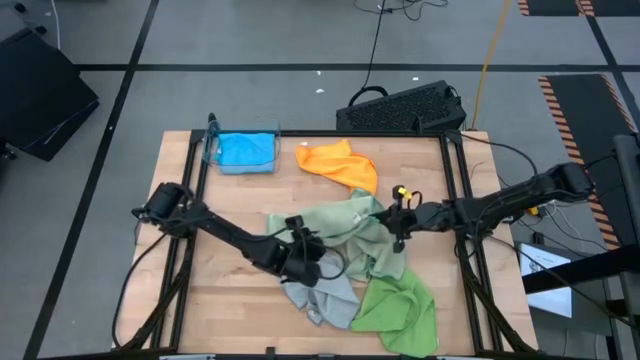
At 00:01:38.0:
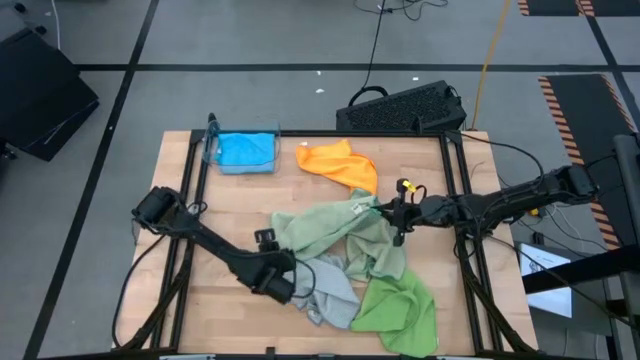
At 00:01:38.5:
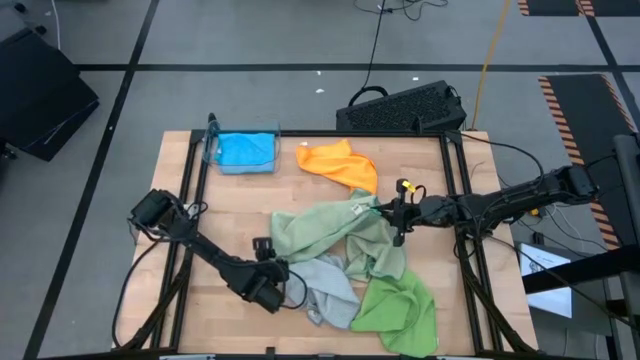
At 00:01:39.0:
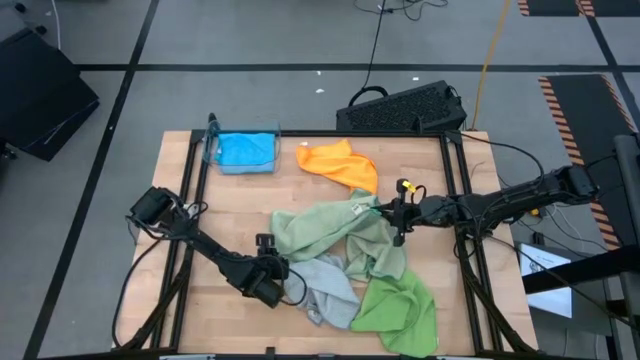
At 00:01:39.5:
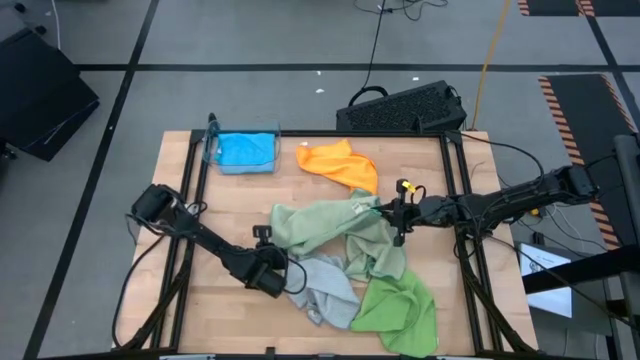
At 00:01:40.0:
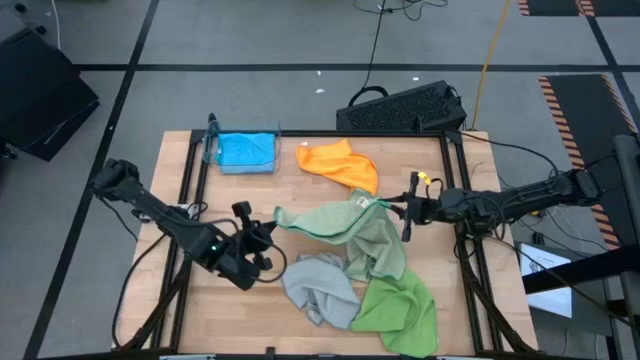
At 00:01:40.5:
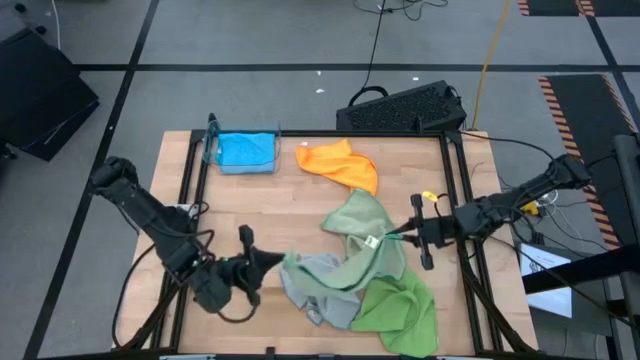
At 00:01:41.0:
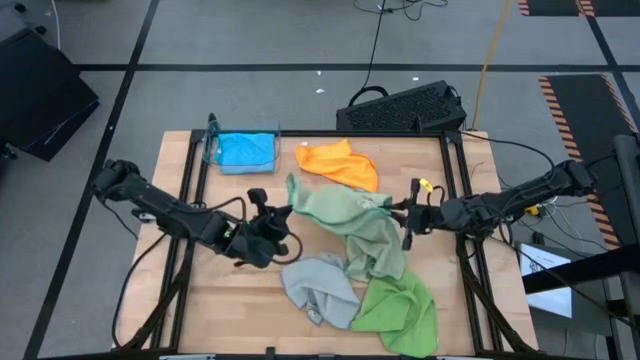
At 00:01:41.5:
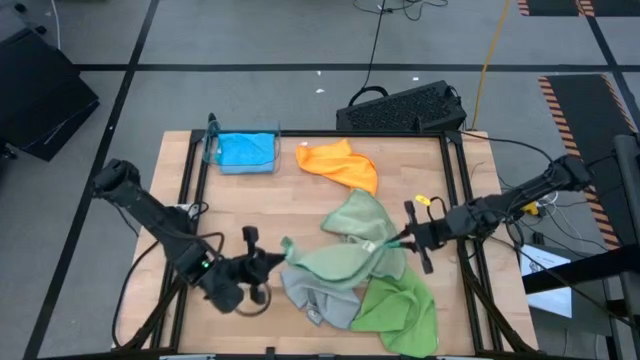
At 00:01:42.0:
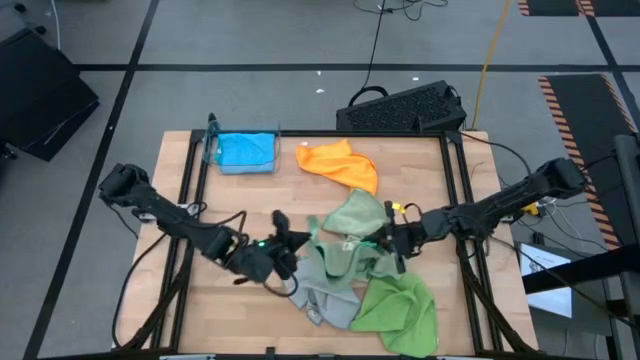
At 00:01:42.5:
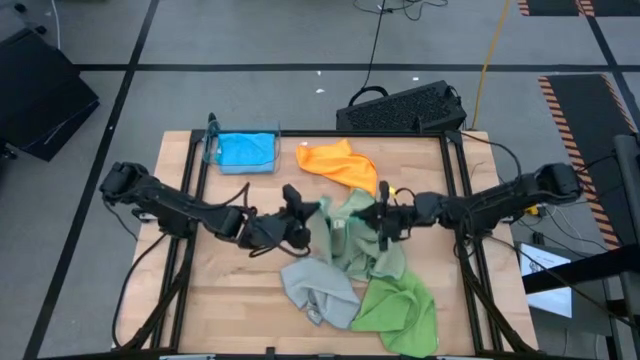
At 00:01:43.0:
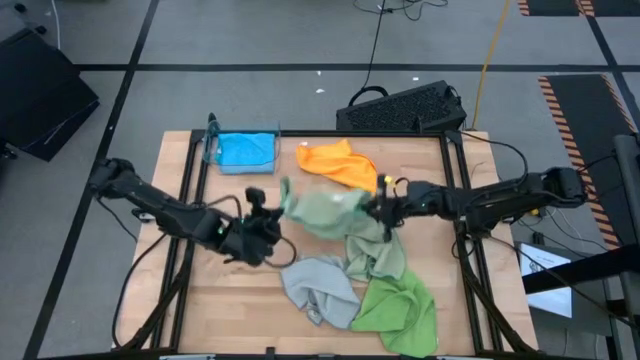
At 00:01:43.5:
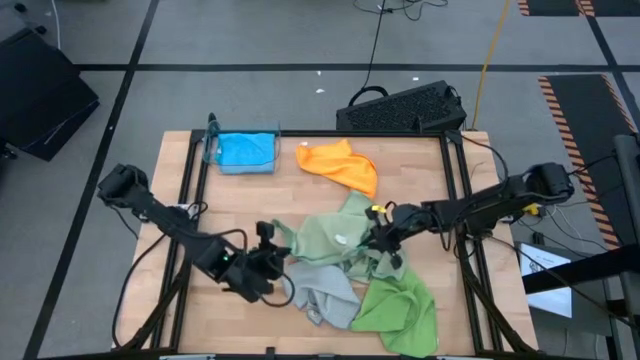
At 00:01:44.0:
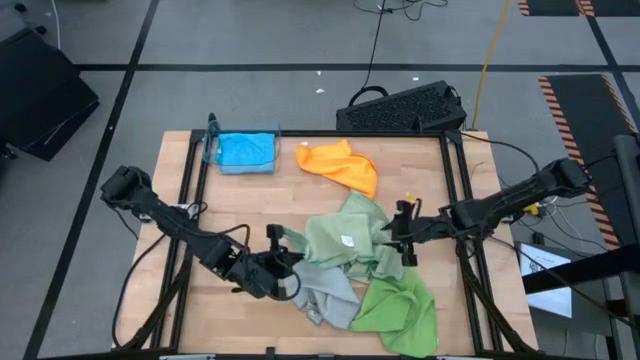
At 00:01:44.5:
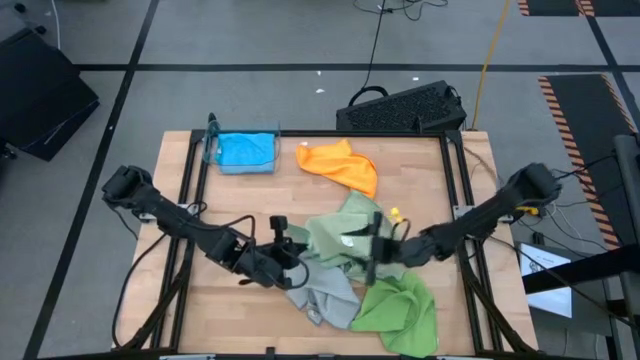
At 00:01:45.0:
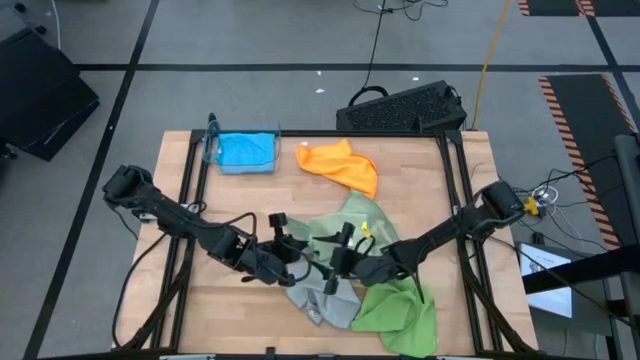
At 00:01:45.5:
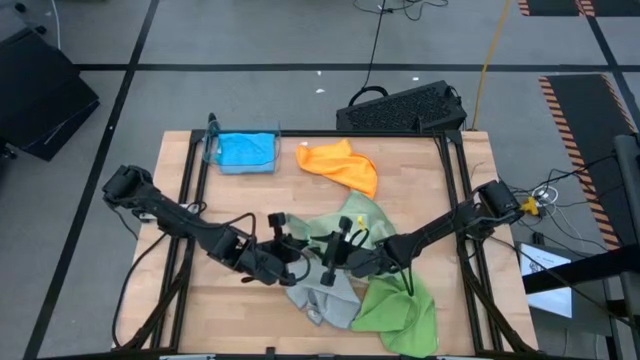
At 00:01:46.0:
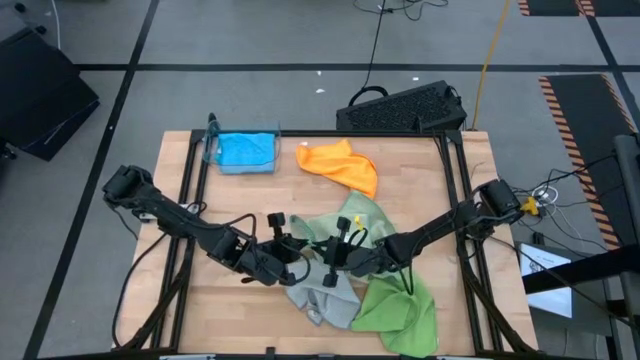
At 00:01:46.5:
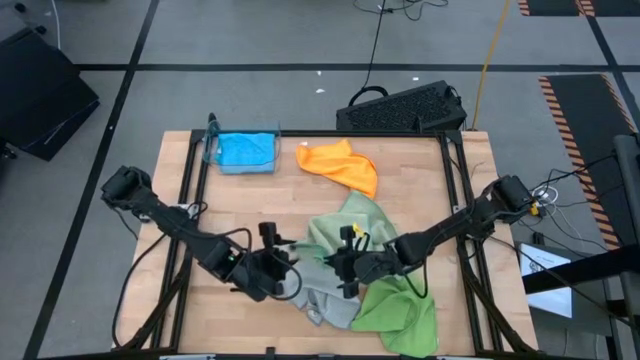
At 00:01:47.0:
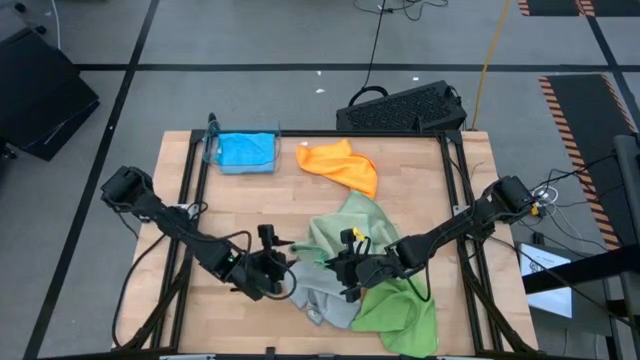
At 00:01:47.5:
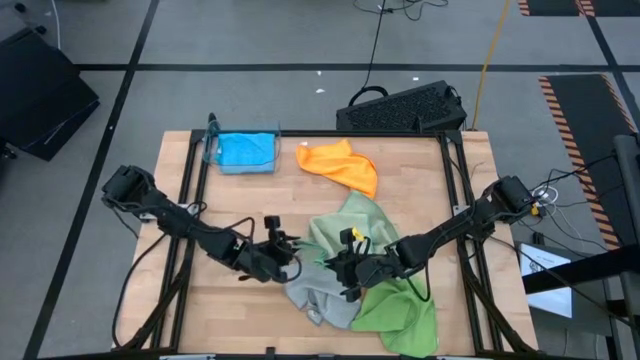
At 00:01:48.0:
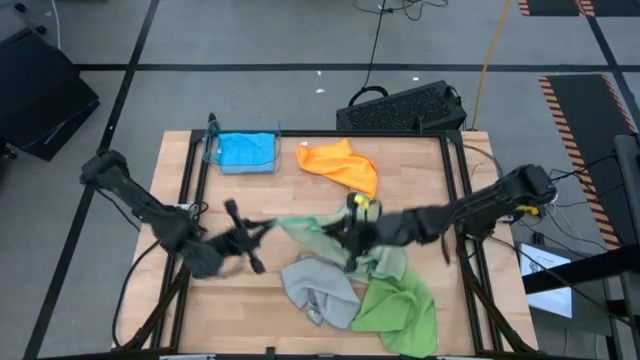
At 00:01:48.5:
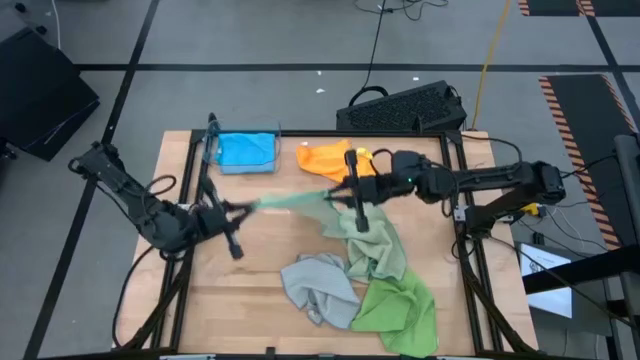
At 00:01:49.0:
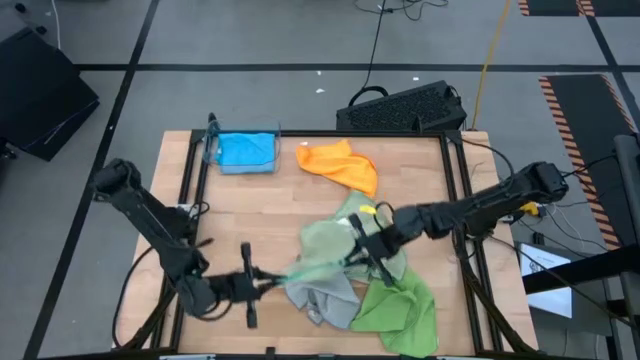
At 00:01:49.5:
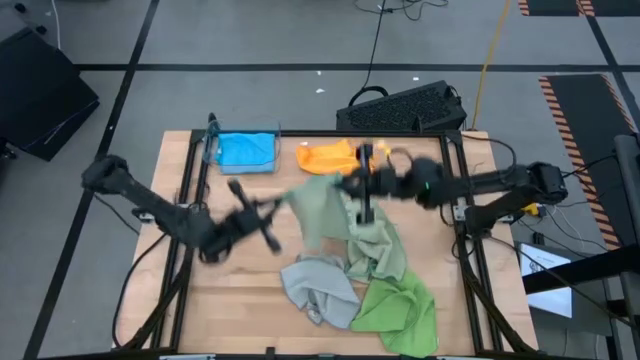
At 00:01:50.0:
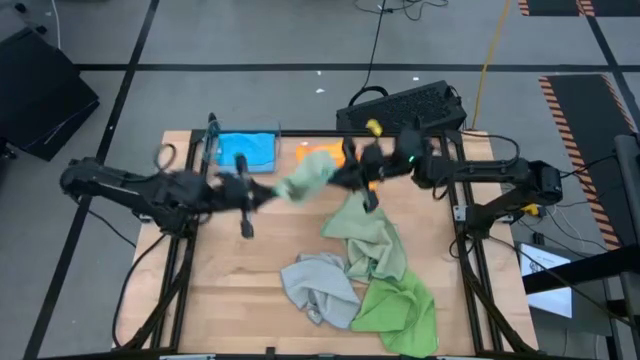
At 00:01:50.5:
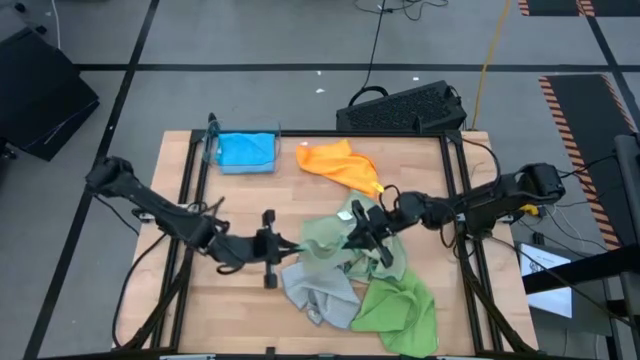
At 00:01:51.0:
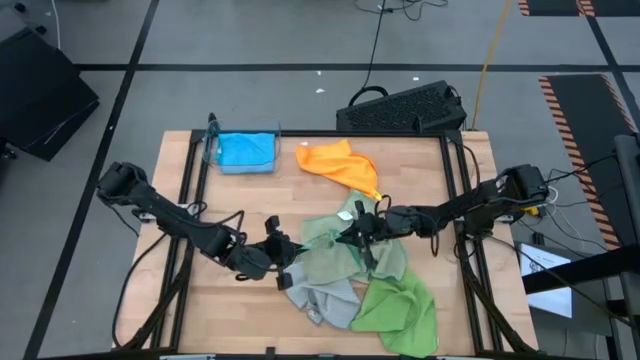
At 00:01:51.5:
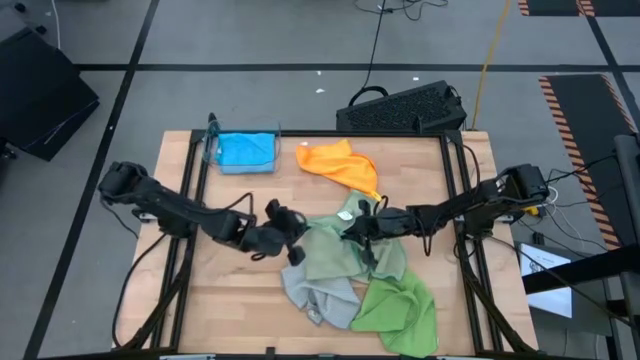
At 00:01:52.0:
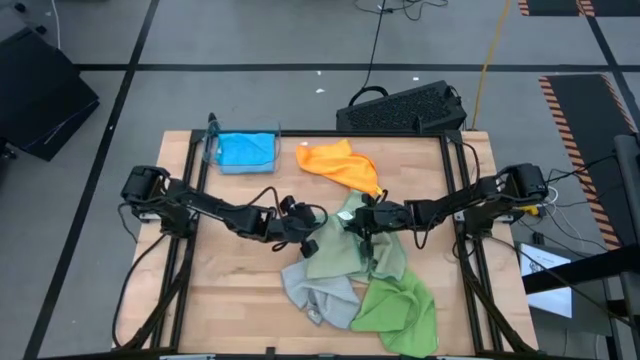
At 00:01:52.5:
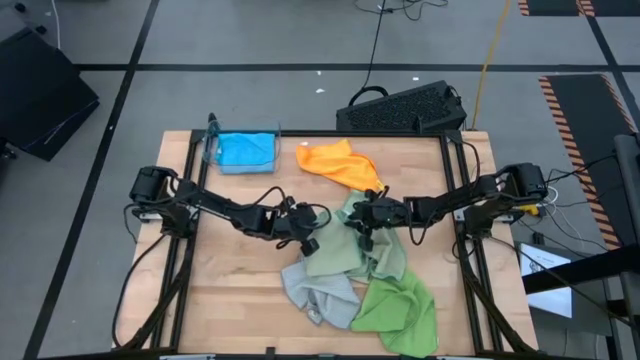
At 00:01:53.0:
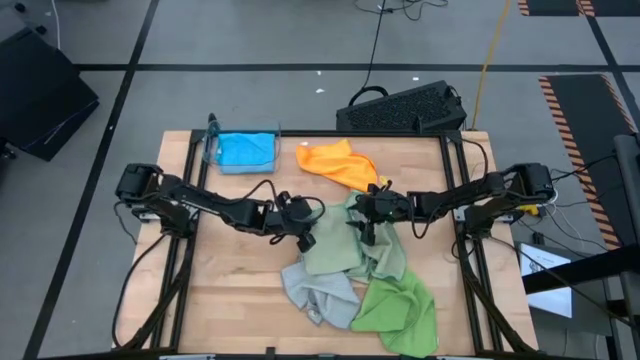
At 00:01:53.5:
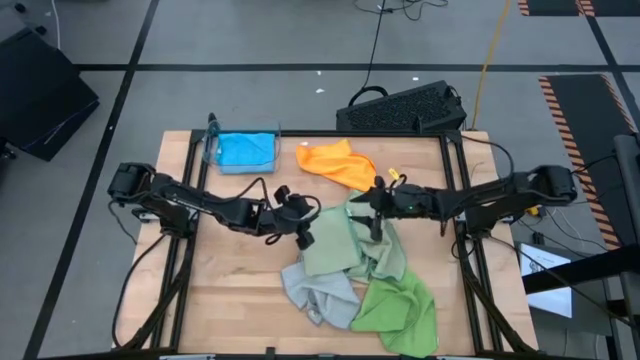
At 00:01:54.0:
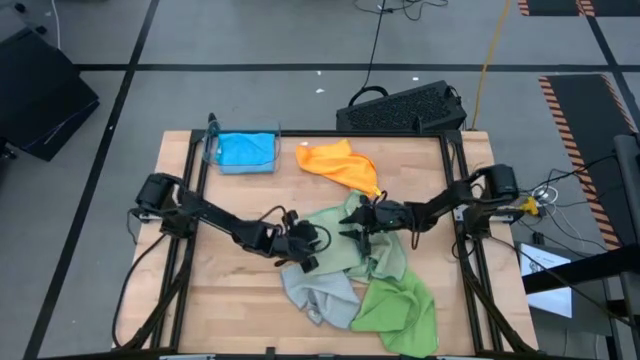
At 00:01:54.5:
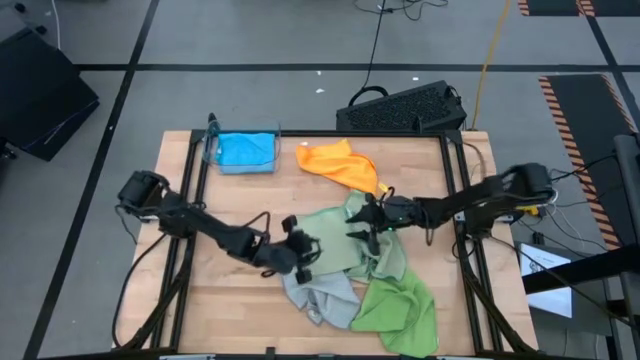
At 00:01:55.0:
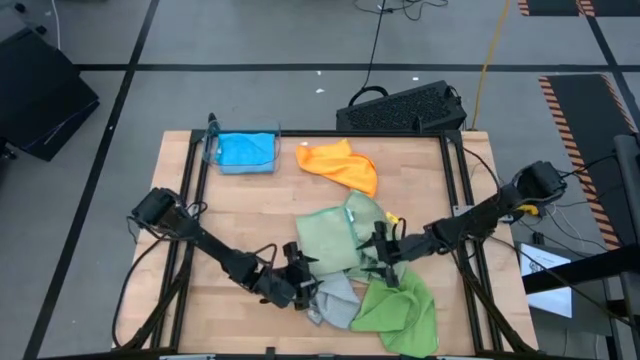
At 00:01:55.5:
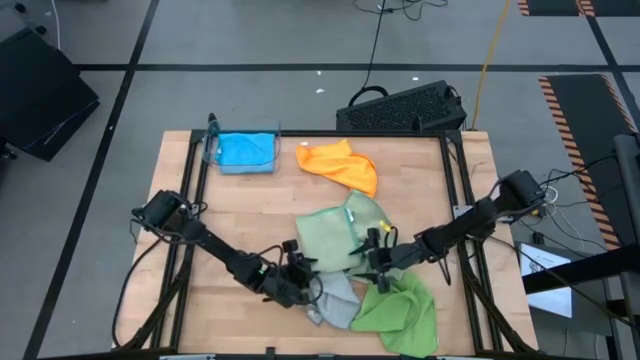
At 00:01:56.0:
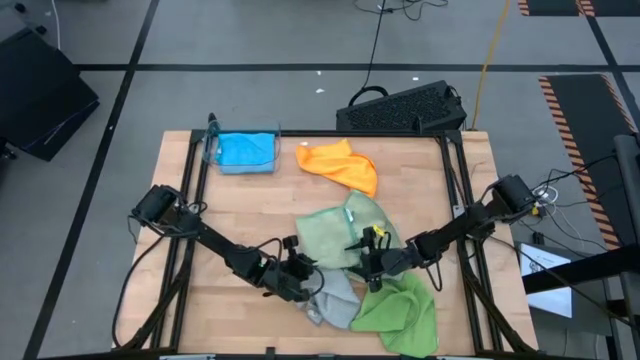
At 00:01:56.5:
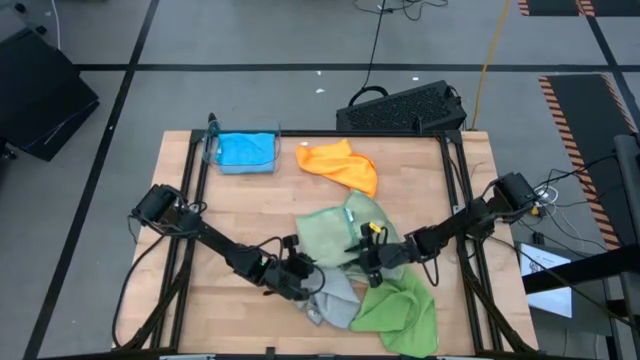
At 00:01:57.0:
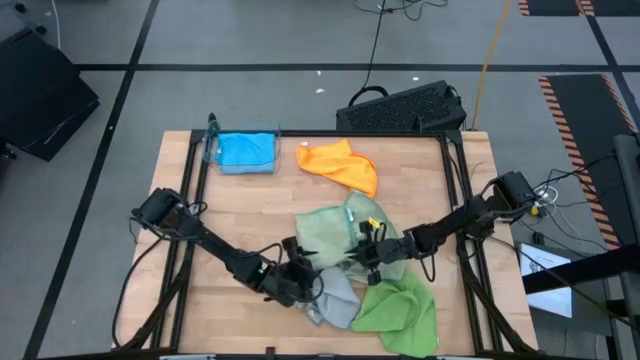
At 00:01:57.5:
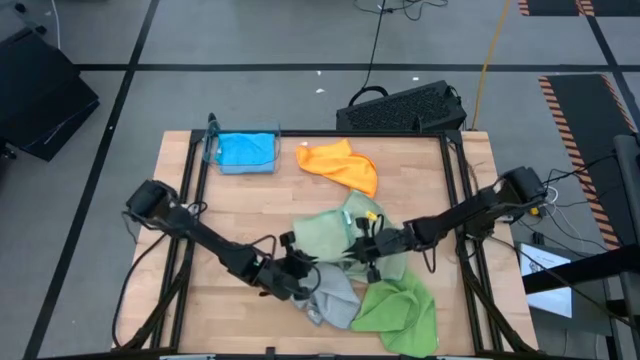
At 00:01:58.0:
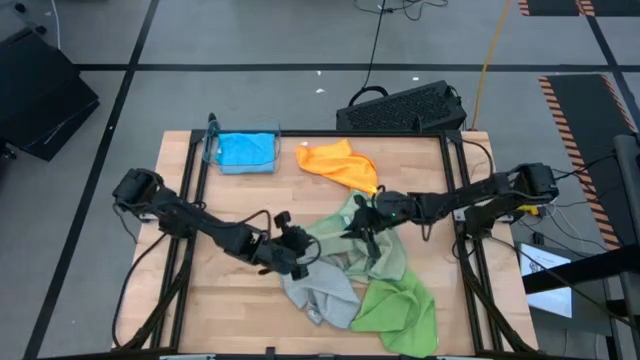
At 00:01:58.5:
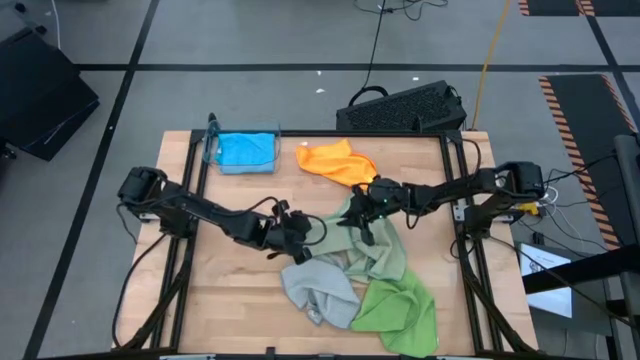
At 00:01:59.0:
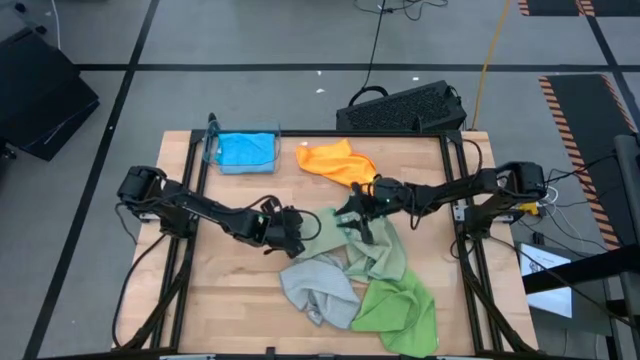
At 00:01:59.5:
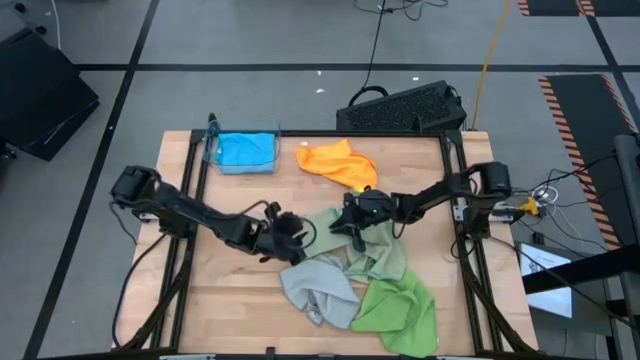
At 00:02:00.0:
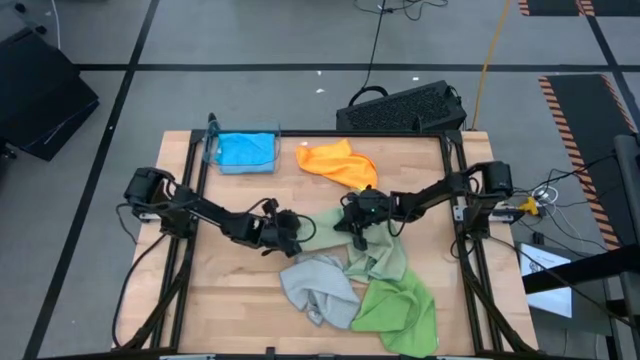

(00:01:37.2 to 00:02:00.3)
Task: Fold microfiber towels
Fold the left light green microfiber cloth
